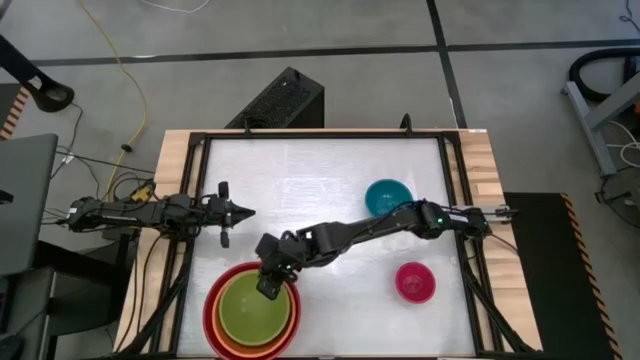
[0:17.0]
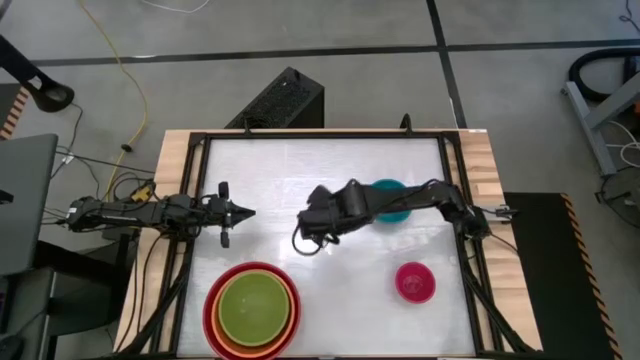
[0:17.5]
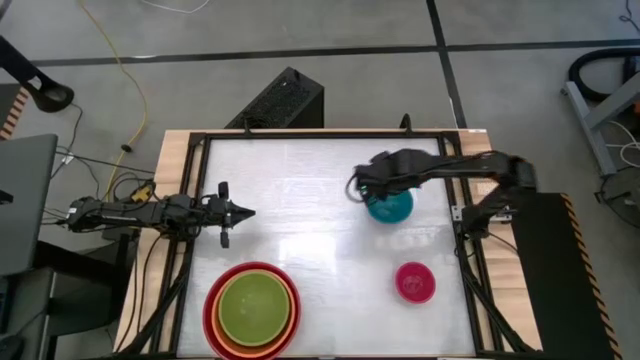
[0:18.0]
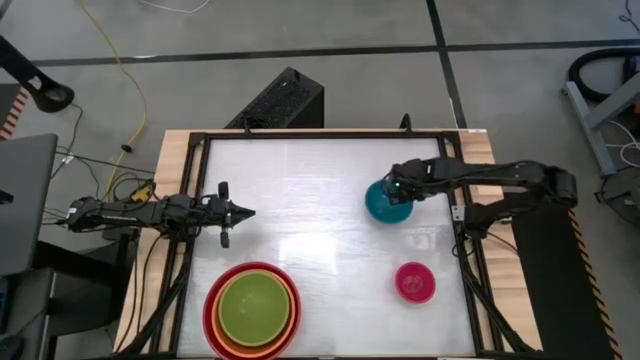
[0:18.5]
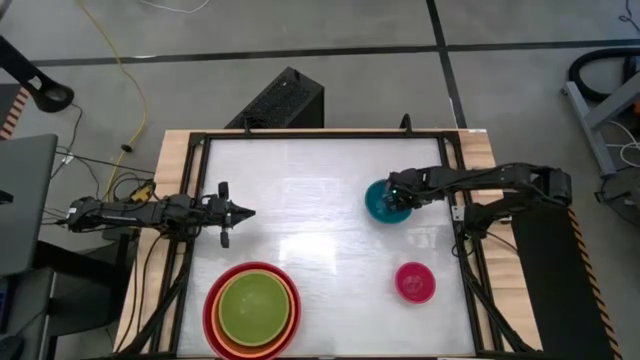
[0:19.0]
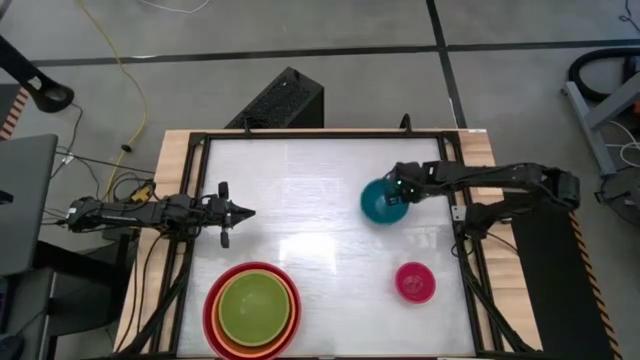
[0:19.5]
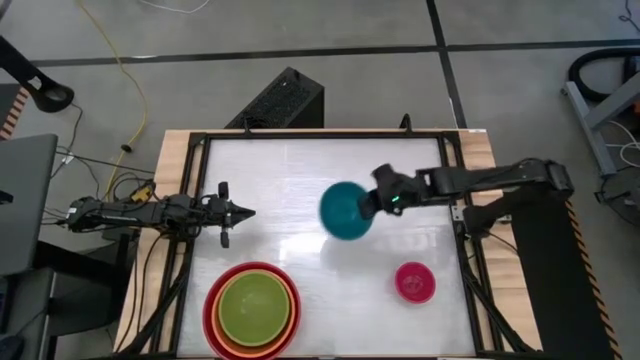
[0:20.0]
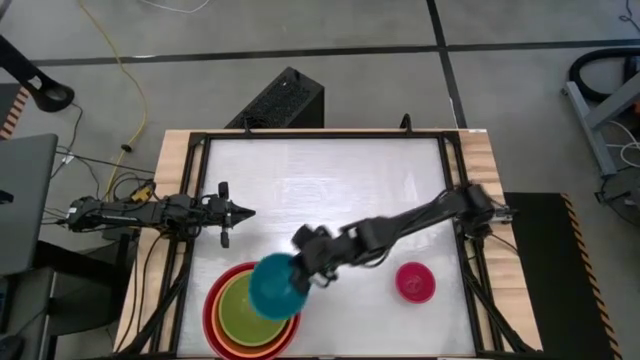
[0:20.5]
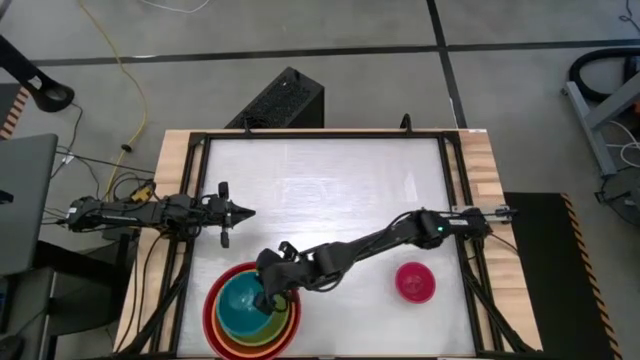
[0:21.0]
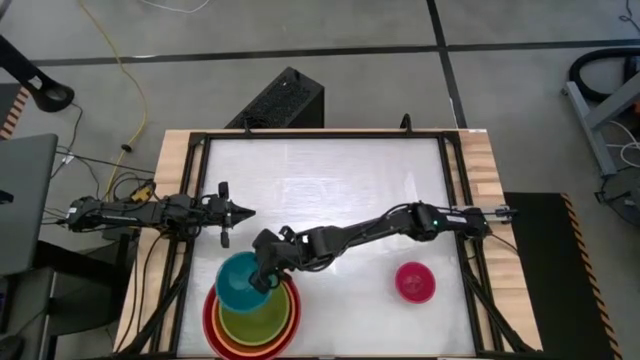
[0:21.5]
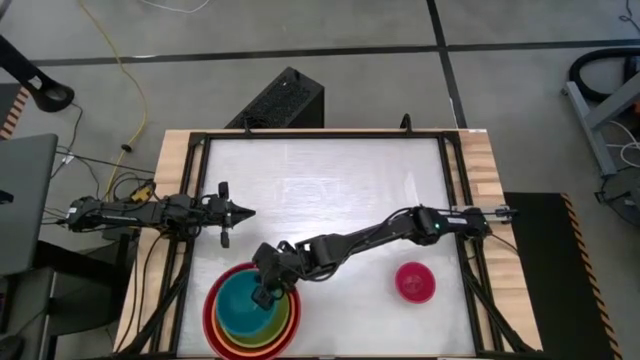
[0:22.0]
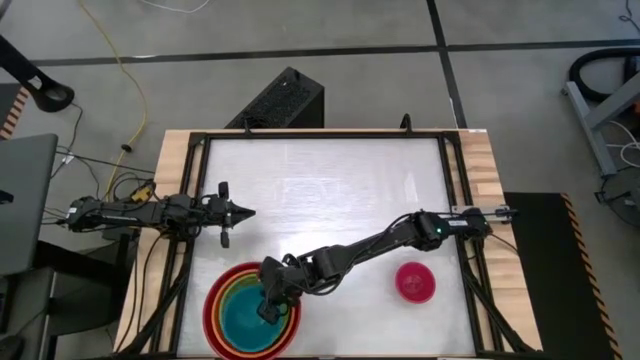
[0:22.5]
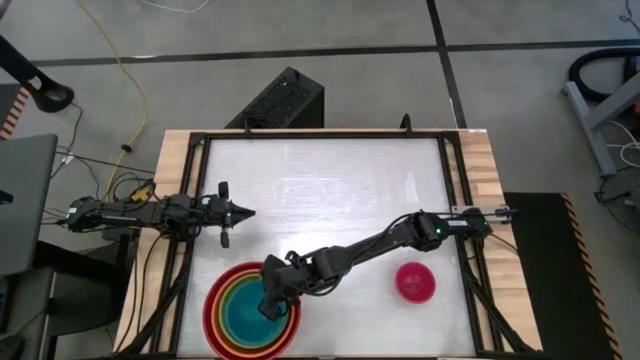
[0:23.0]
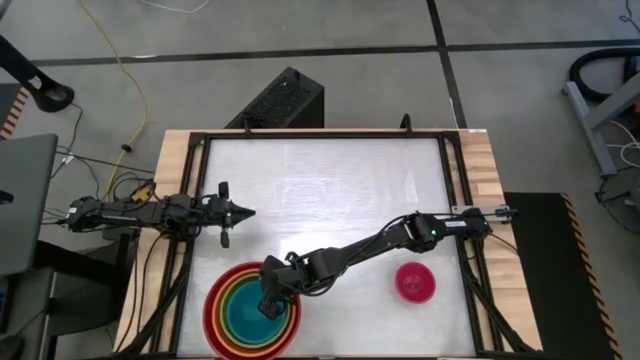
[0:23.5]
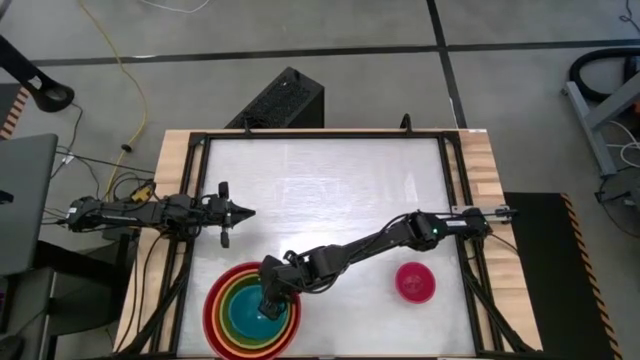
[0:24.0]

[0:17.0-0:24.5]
Stack the blue bowl on top of the green stacked bowls

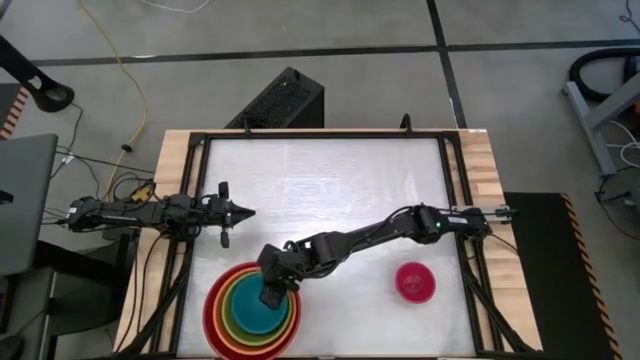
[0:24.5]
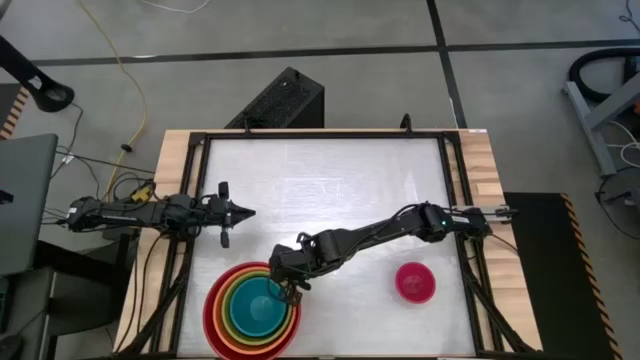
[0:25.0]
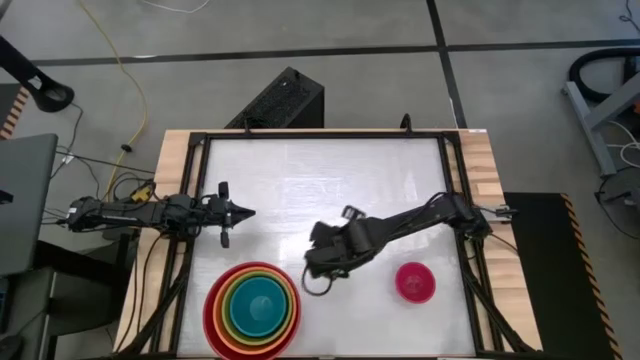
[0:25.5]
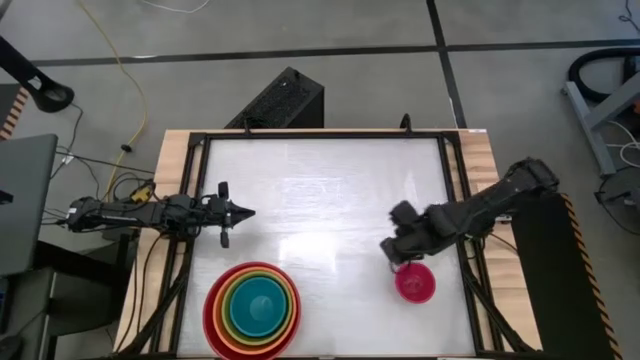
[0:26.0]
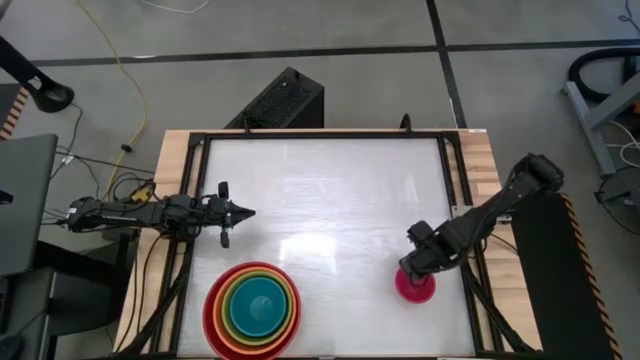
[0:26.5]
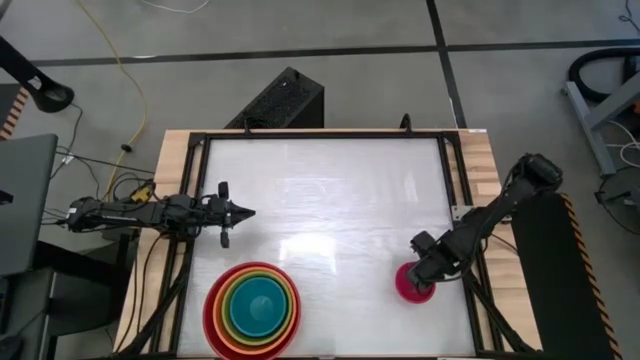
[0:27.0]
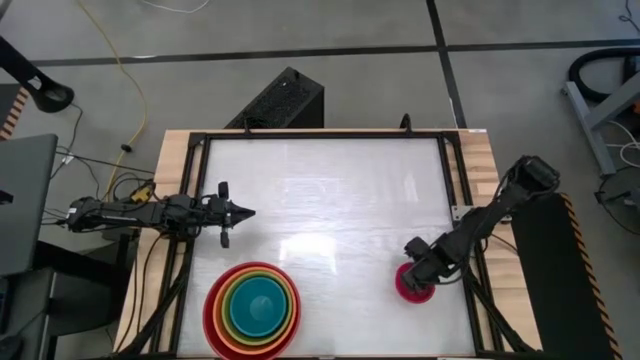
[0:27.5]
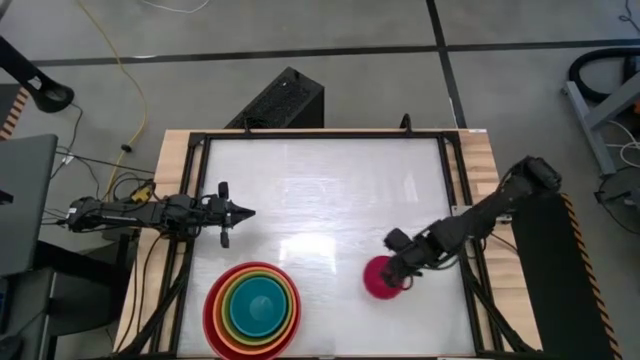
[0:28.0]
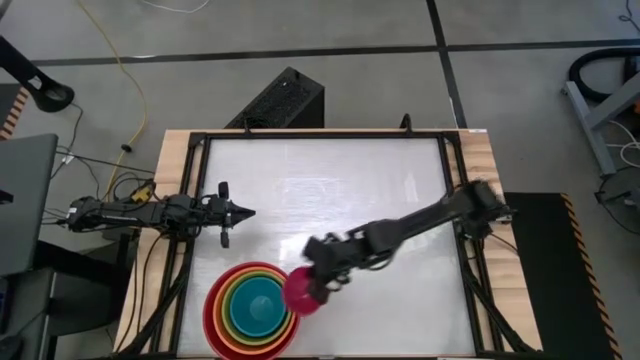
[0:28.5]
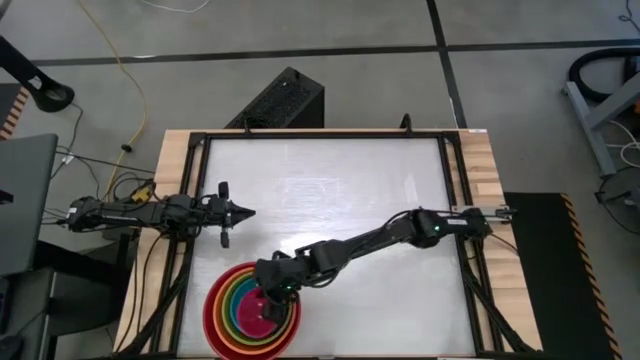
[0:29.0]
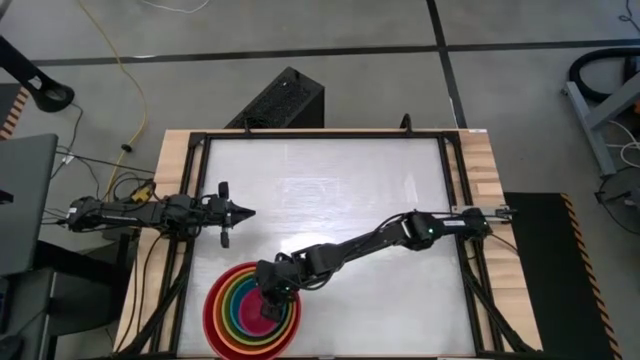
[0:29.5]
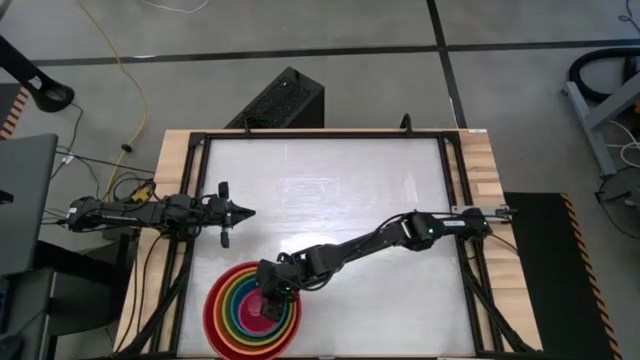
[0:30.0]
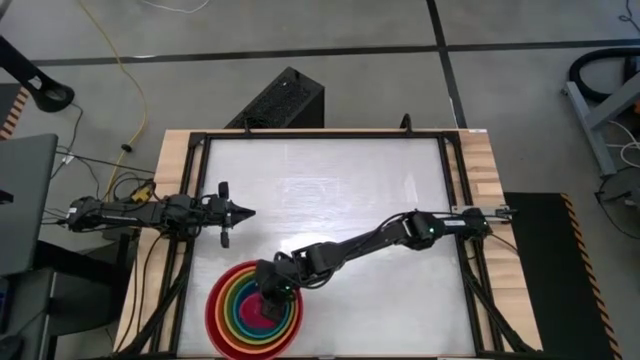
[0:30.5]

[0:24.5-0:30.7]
Stack the red bowl on top of the green stacked bowls

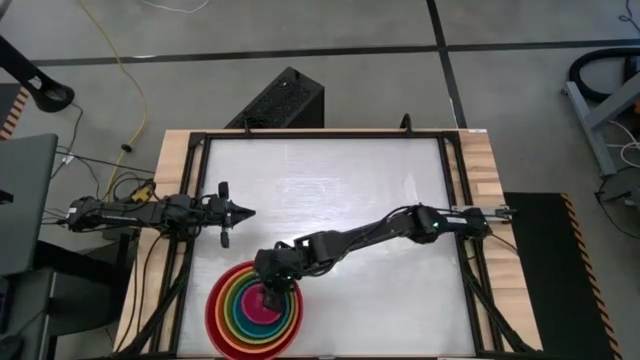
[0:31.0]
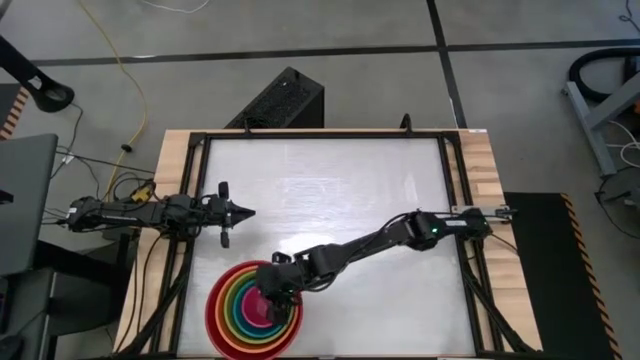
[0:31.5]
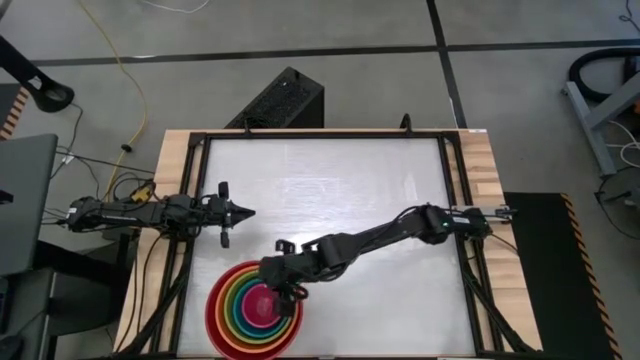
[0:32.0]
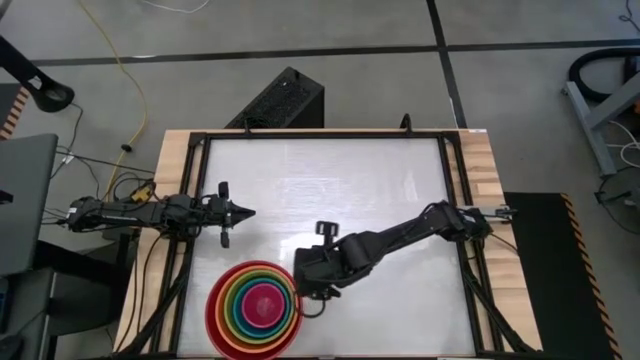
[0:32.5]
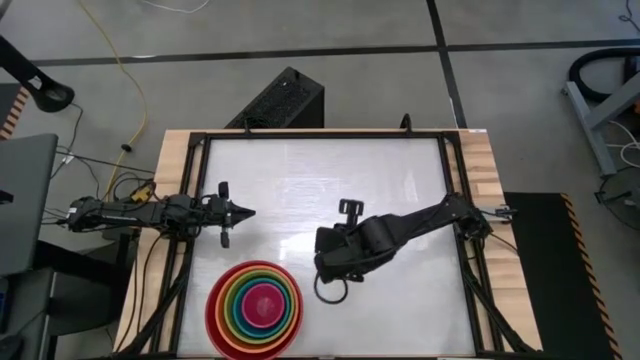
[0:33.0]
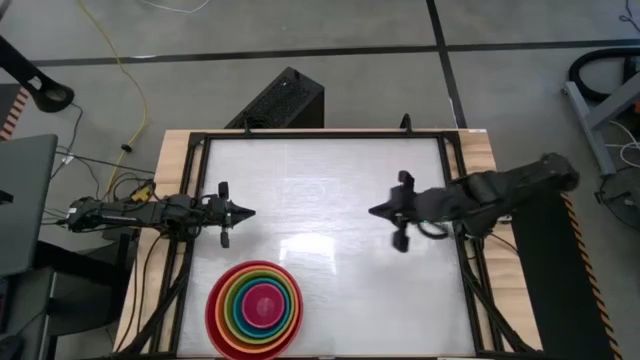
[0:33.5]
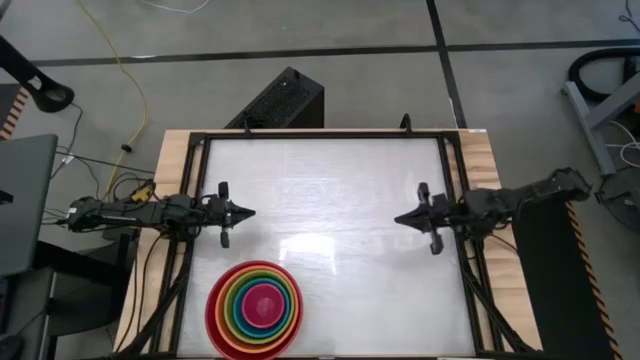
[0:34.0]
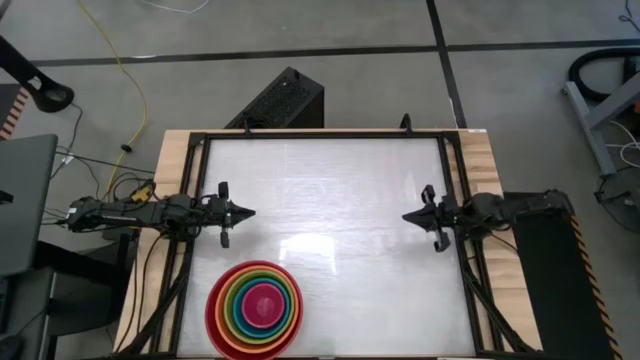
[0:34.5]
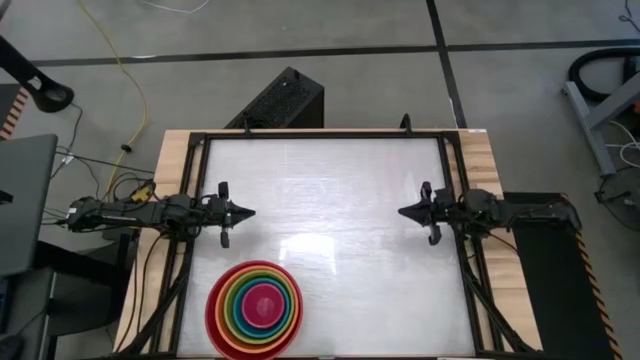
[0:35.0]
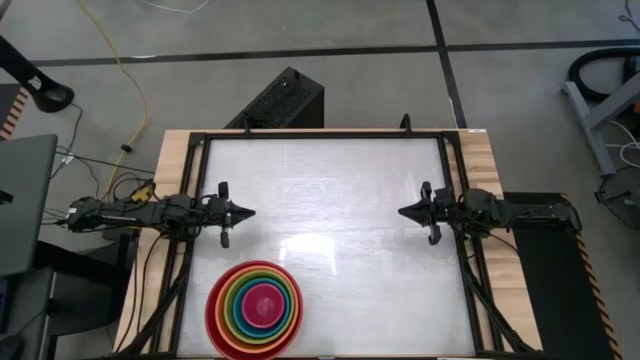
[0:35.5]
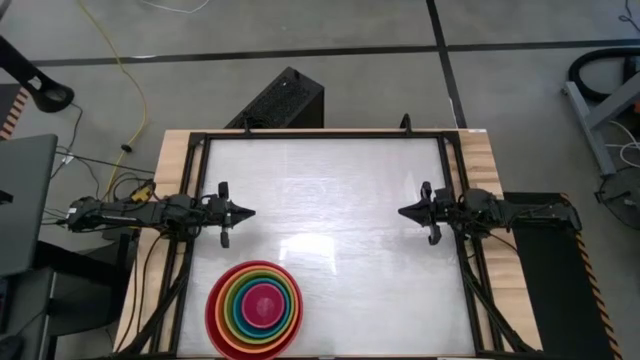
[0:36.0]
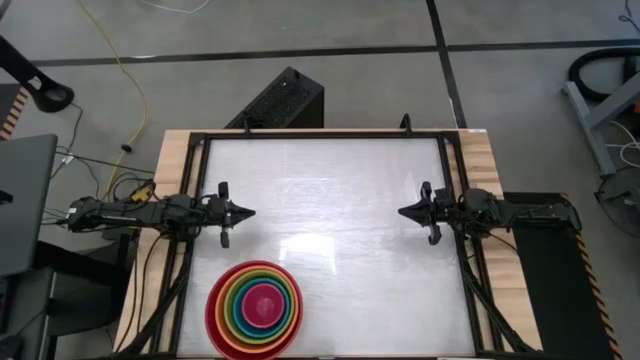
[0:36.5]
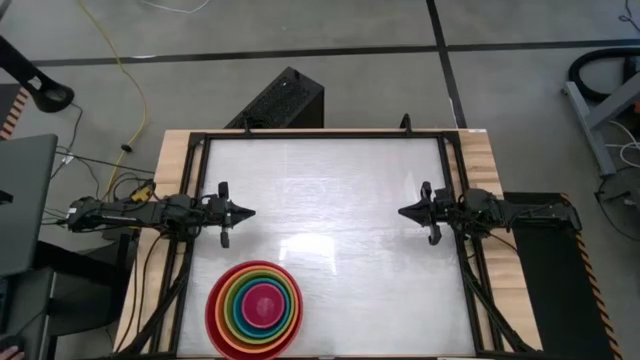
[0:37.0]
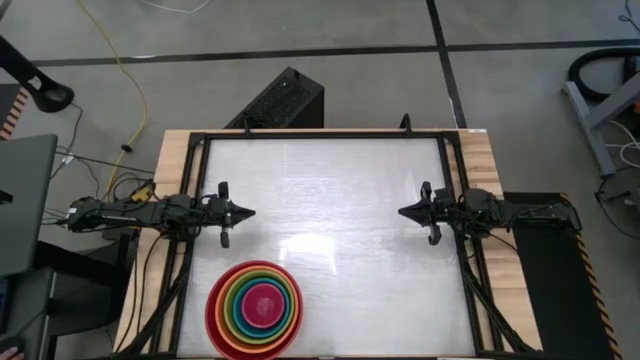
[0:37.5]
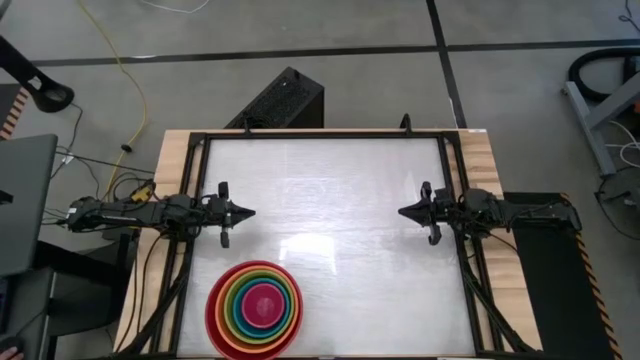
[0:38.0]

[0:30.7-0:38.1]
Return to Home Position
